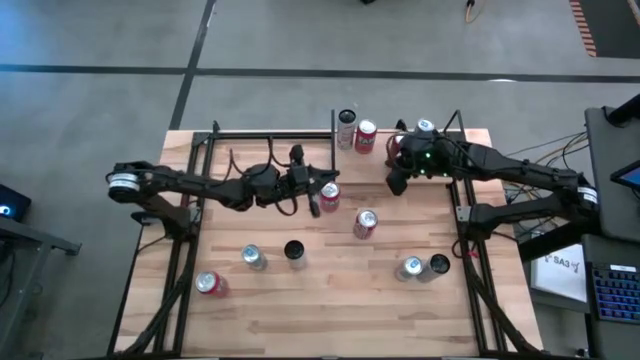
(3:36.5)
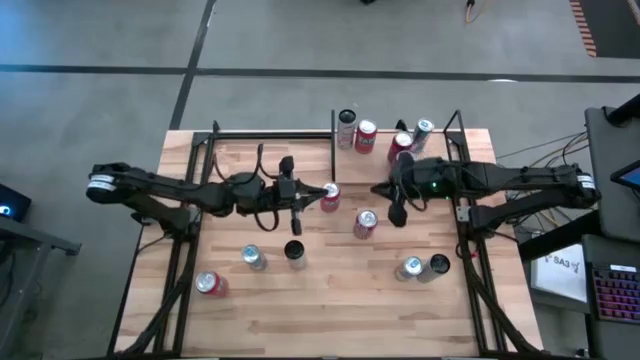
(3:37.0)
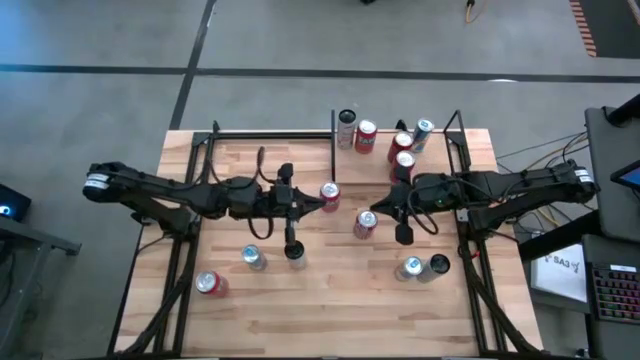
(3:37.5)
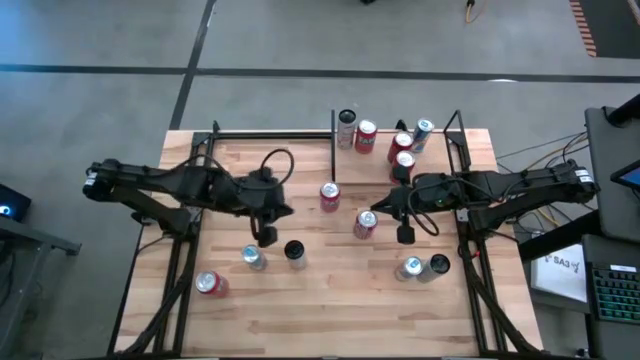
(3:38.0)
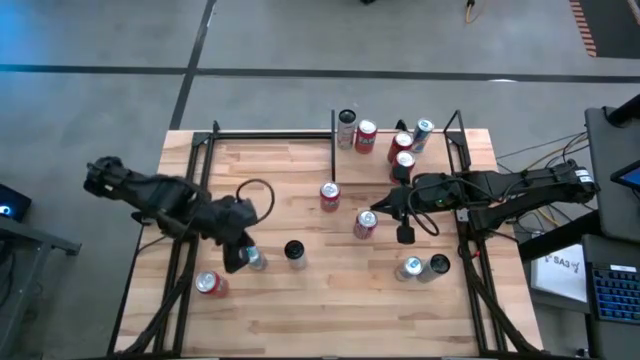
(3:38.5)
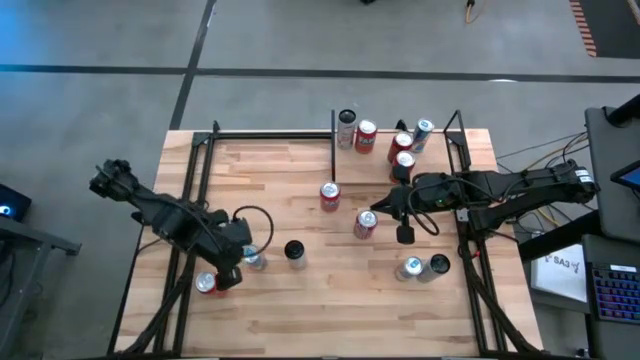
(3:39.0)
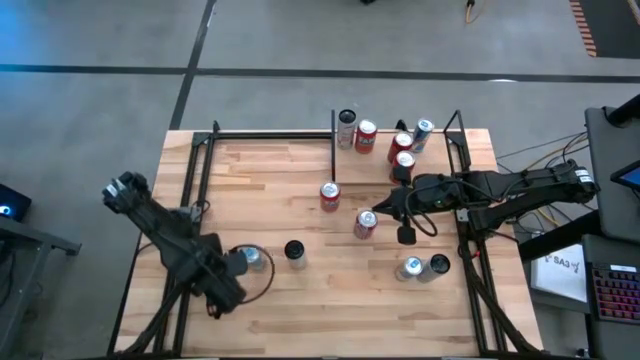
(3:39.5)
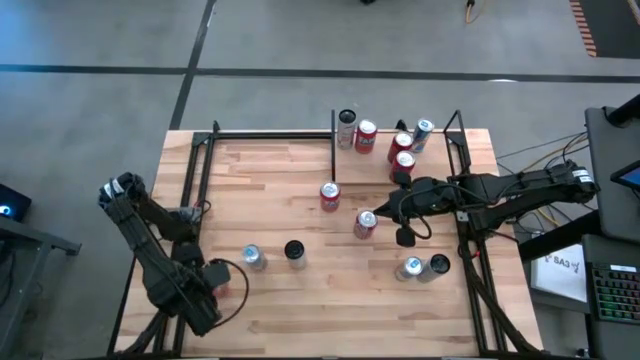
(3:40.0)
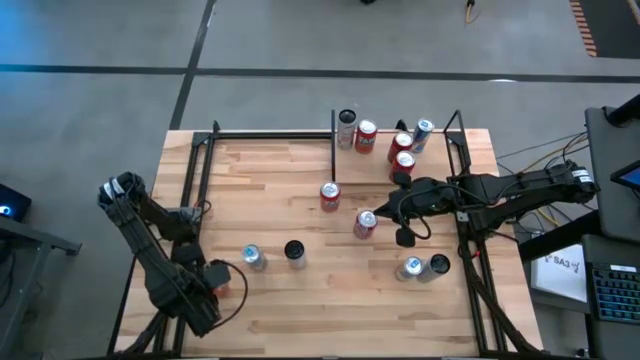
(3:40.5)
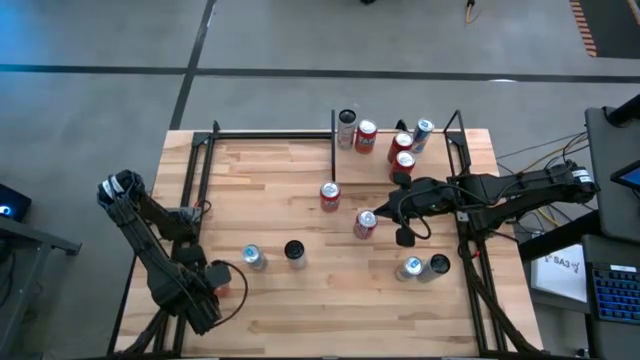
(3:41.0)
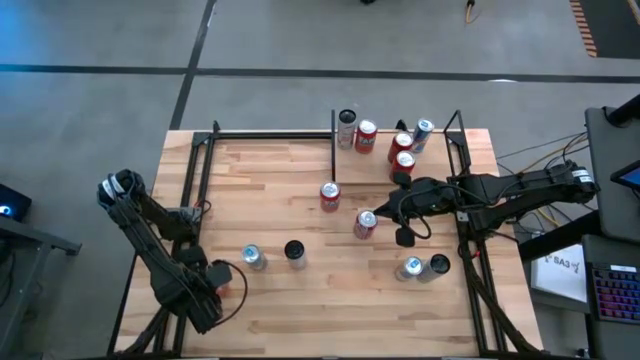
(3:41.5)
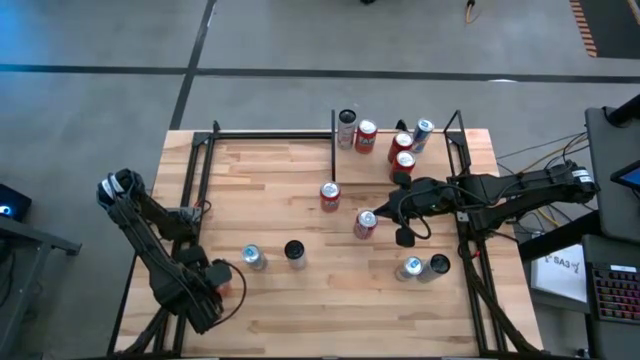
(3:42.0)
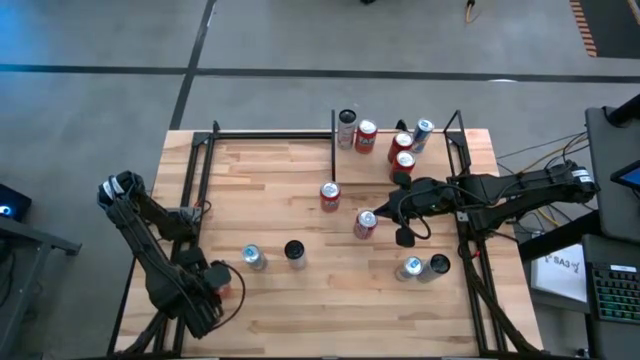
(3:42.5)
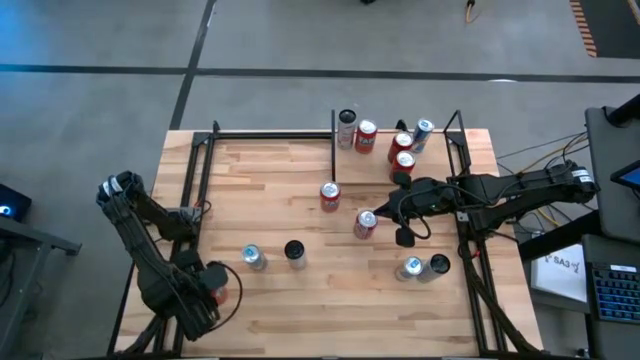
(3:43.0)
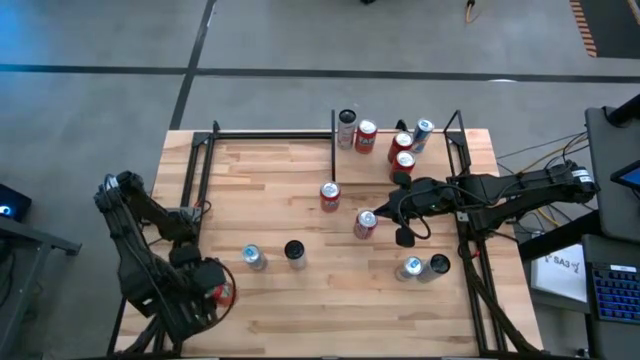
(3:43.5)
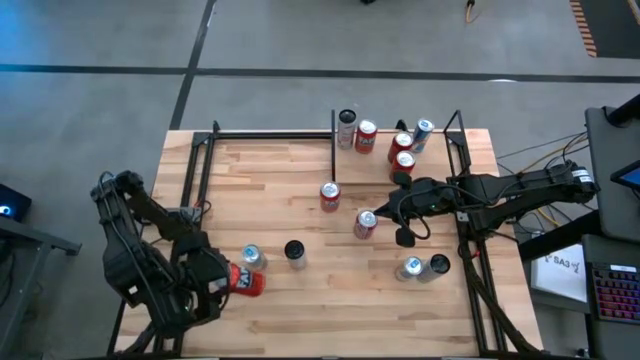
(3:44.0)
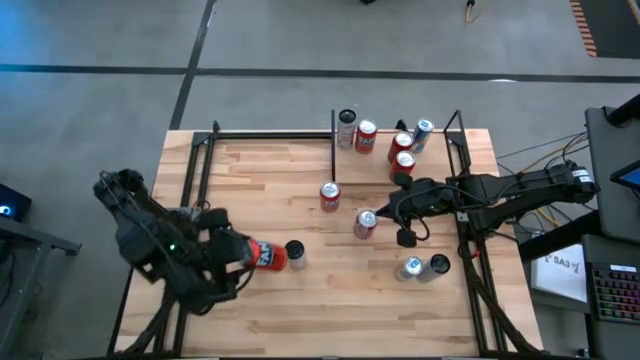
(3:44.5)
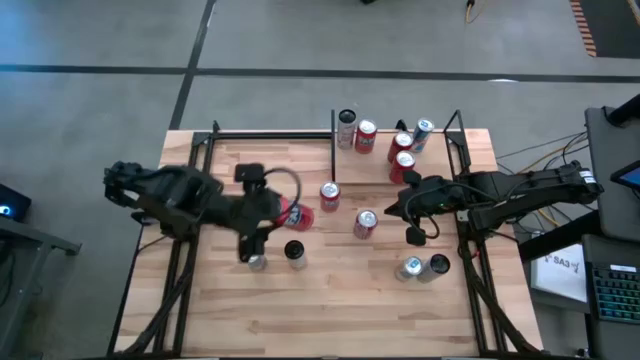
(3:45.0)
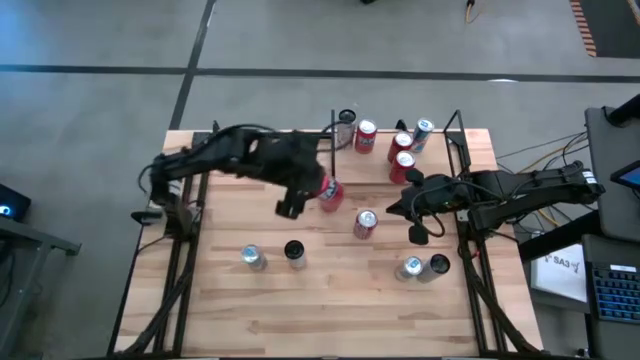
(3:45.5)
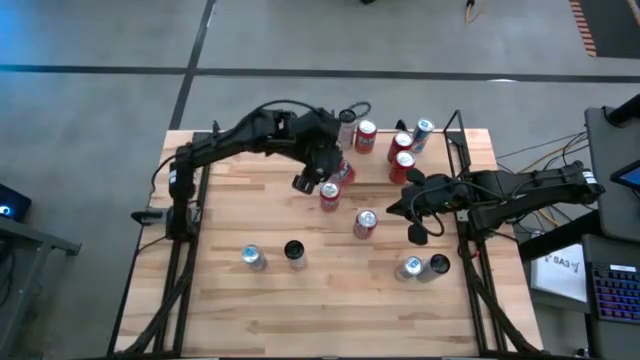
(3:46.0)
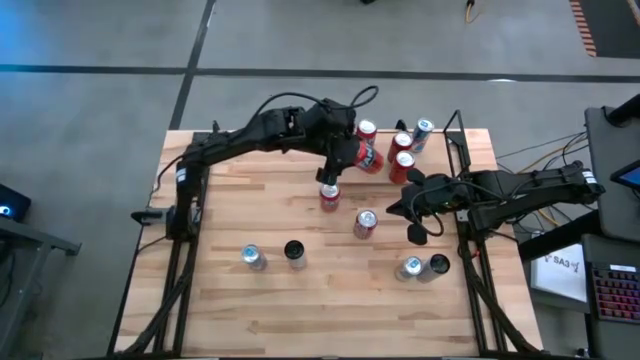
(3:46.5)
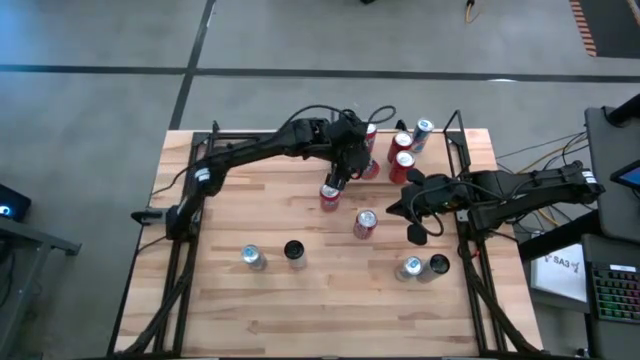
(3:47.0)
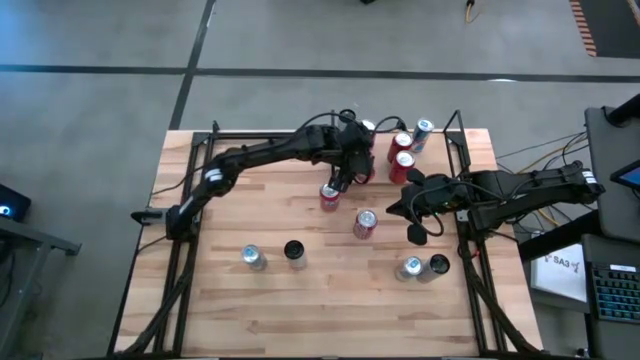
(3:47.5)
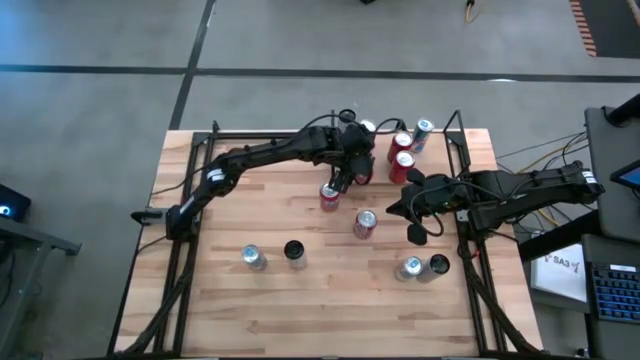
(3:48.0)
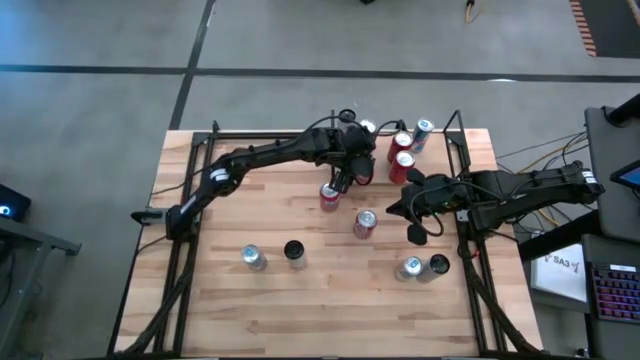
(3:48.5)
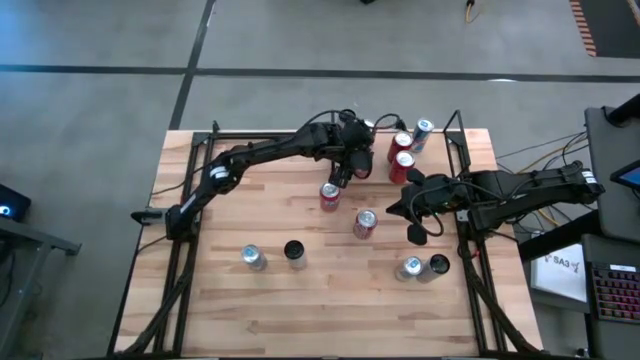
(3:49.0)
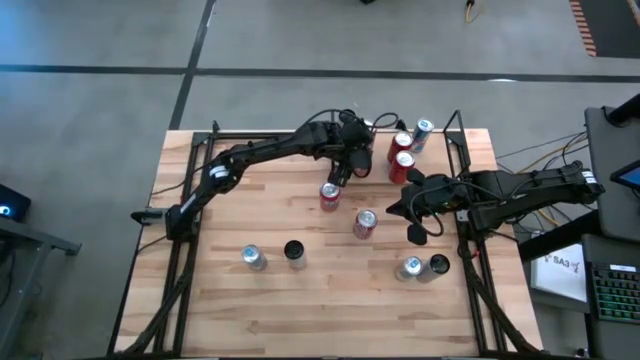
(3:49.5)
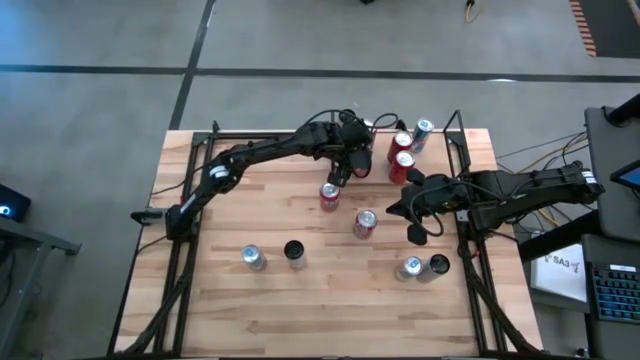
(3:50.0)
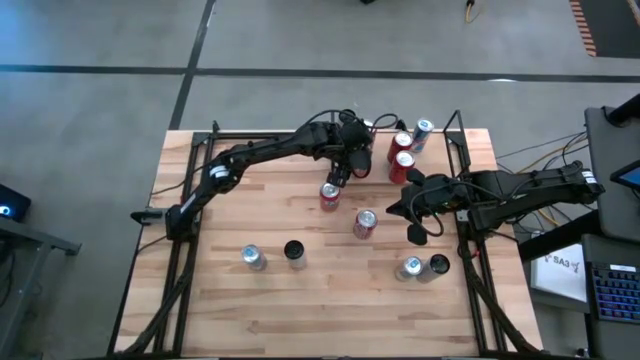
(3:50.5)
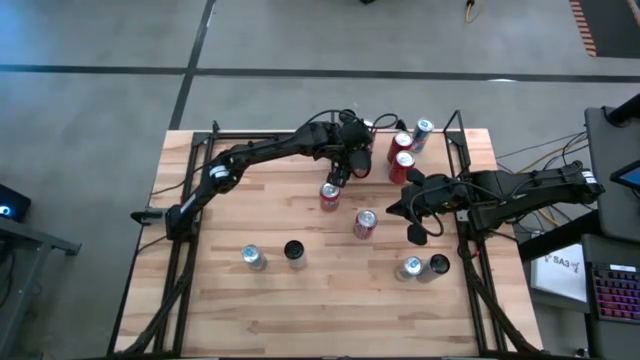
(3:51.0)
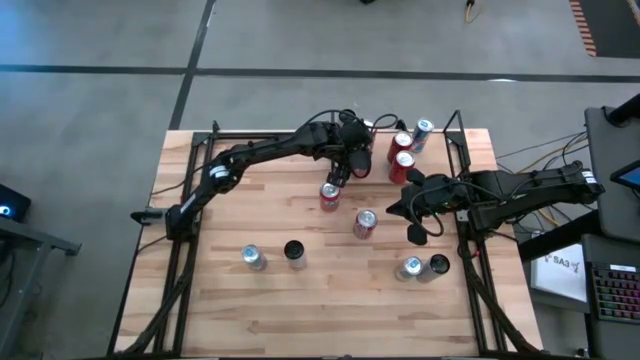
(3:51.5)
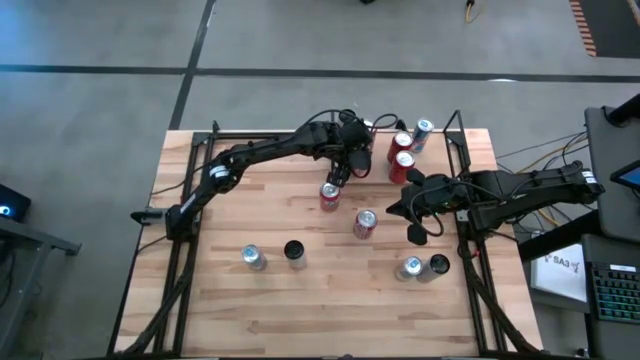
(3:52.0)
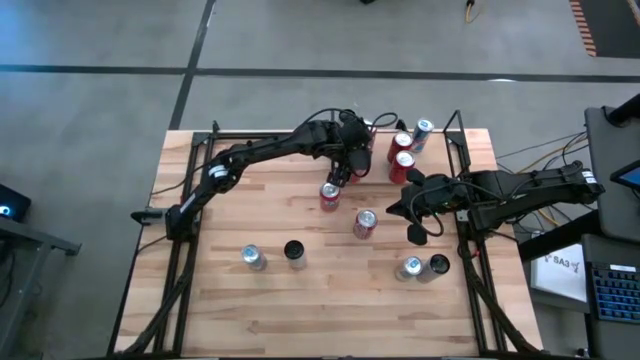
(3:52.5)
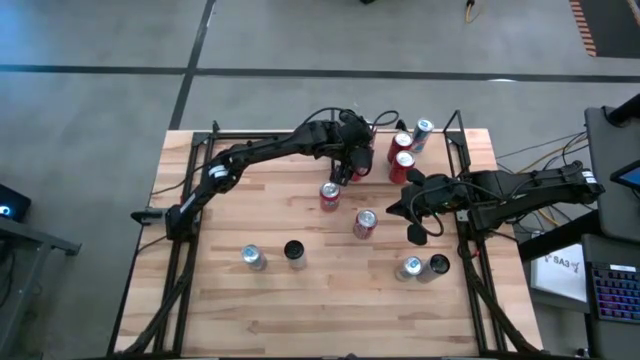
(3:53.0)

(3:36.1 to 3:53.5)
Task: Place canned beverage on shelf
Put the bottom orange soda can on the shelf aligned with the other orange soda can

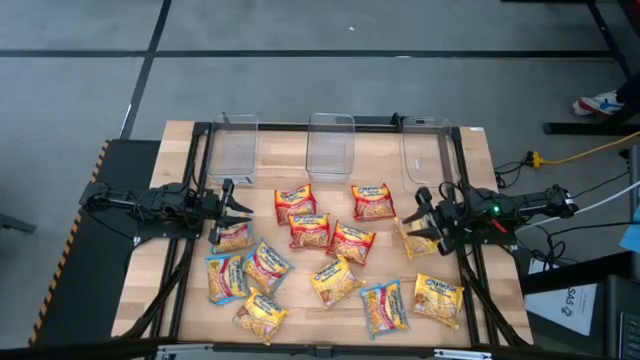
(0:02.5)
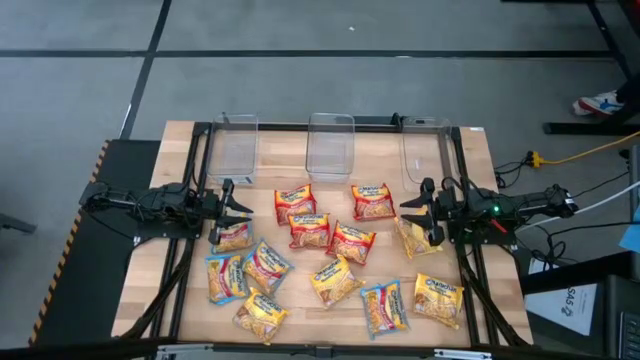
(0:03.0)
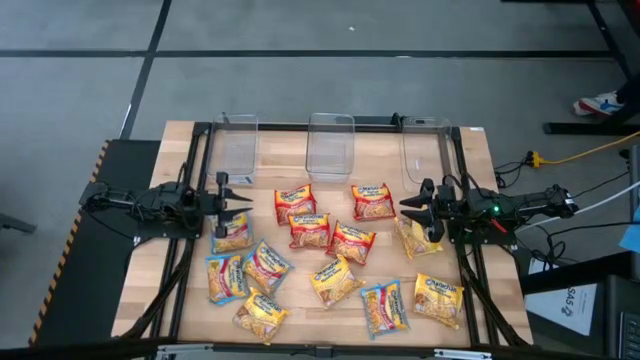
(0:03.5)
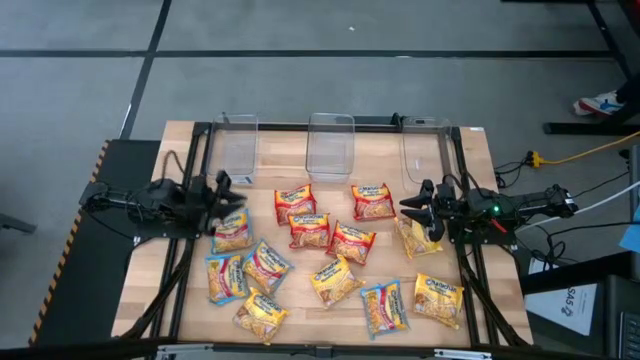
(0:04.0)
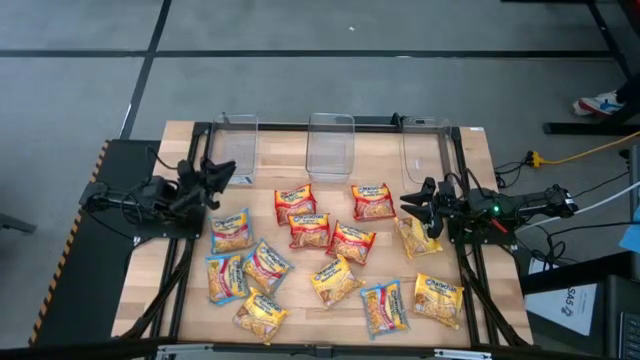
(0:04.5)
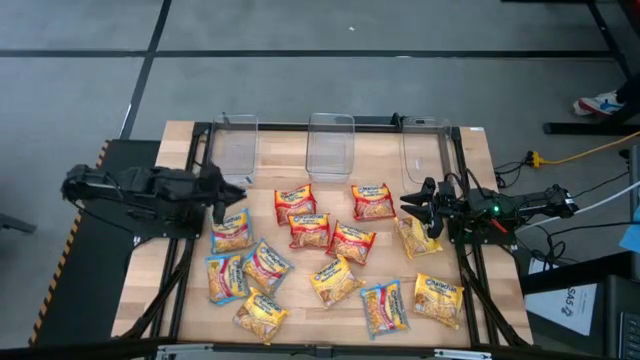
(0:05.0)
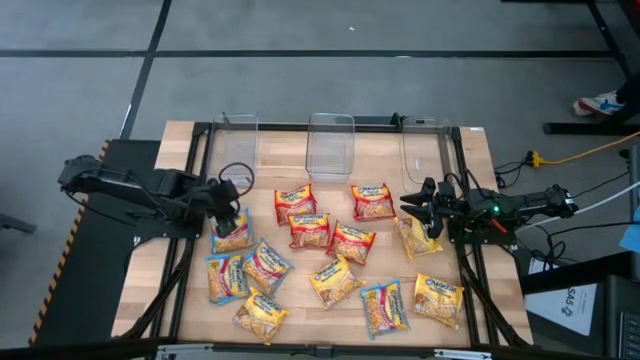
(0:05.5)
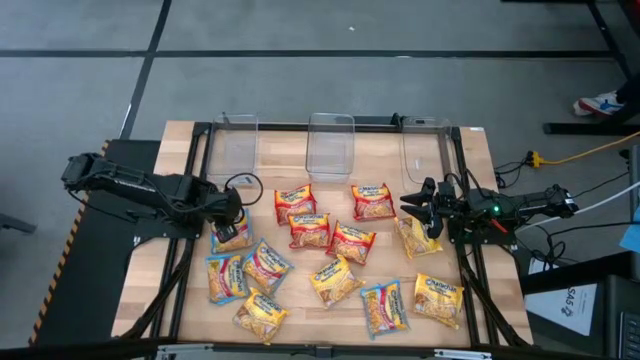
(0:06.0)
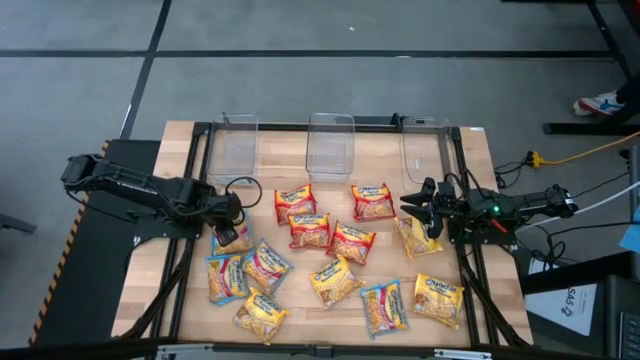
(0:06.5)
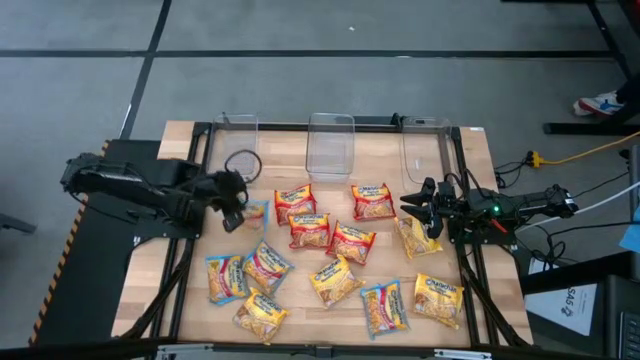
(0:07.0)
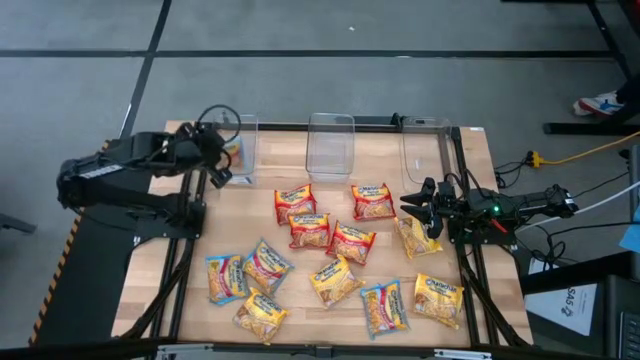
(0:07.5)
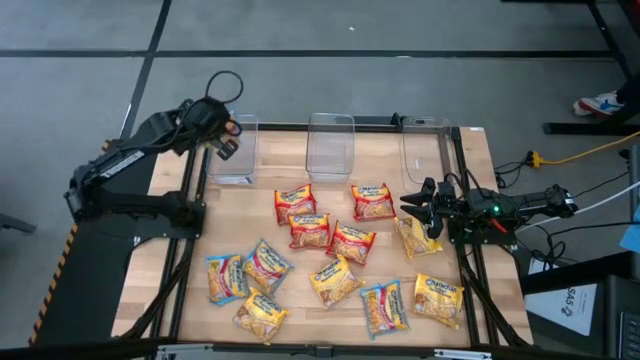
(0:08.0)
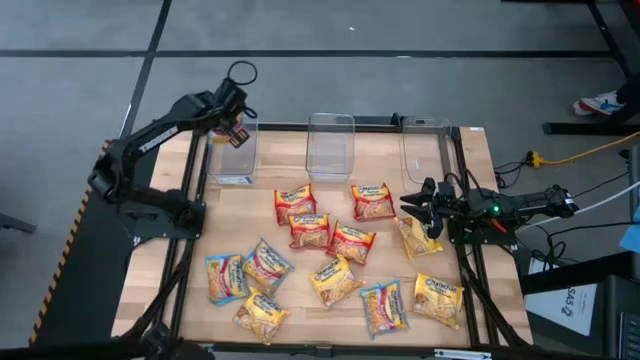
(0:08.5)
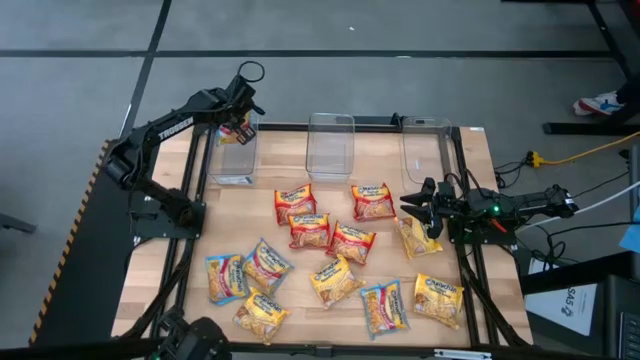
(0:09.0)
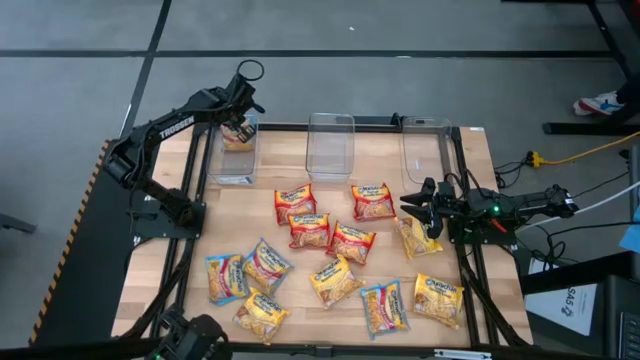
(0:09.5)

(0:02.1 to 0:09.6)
Task: Sort Maruchan noodles
Put the blue noodle pack in the left transparent basket
